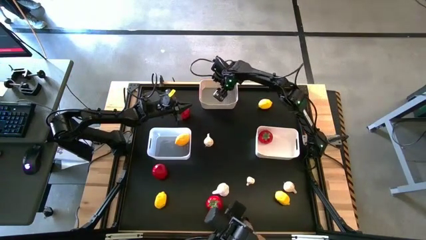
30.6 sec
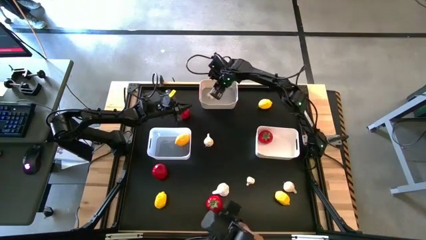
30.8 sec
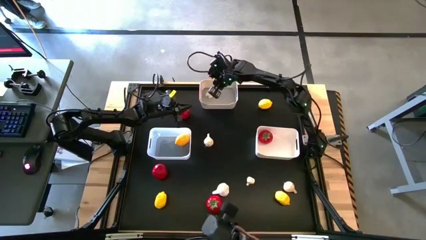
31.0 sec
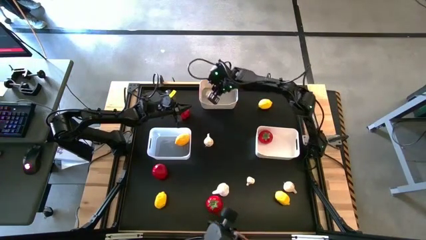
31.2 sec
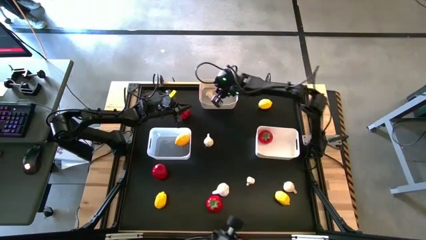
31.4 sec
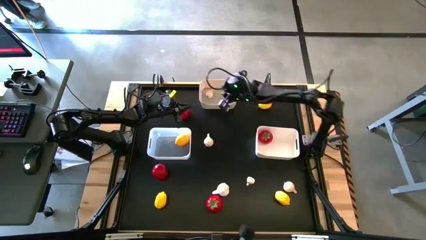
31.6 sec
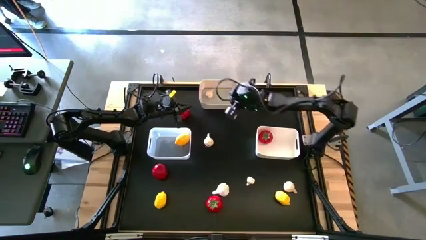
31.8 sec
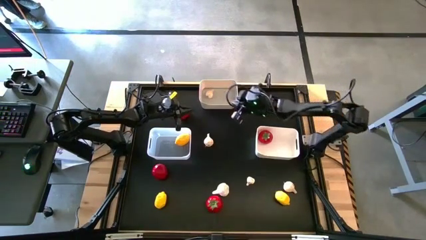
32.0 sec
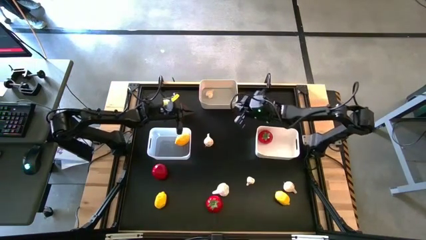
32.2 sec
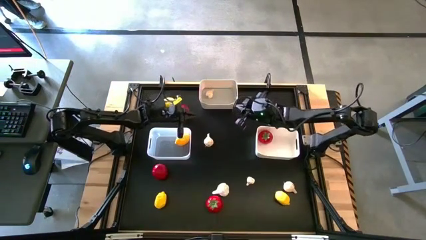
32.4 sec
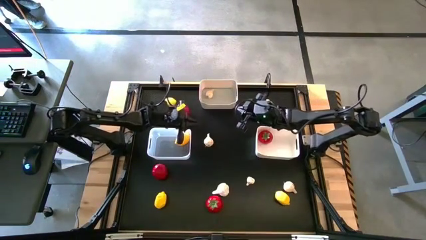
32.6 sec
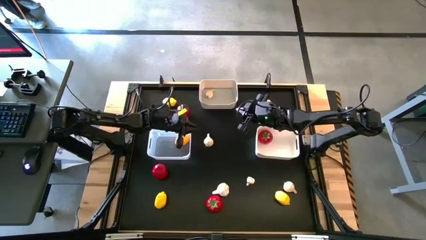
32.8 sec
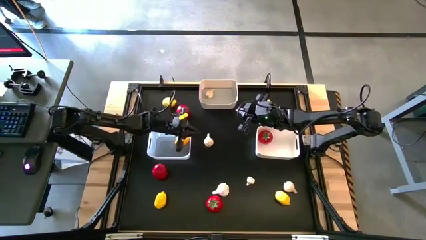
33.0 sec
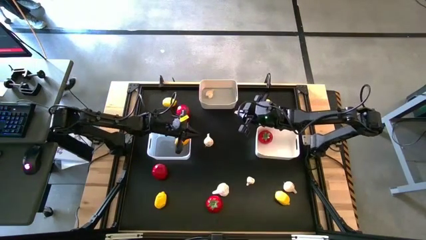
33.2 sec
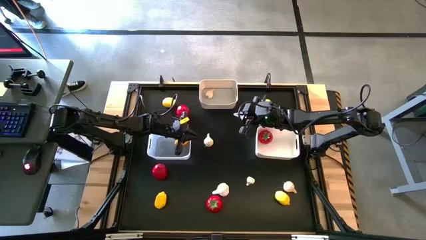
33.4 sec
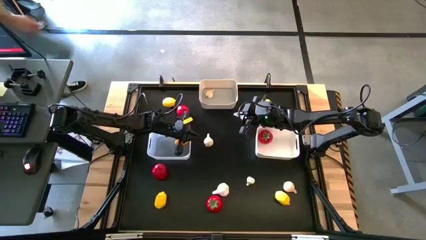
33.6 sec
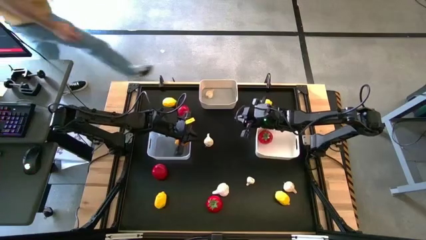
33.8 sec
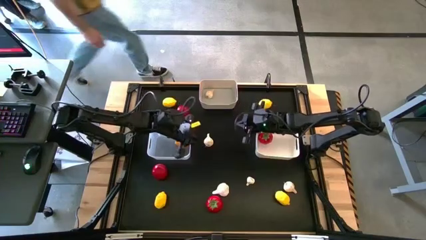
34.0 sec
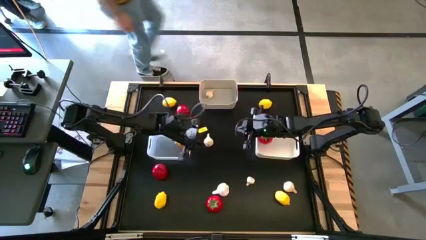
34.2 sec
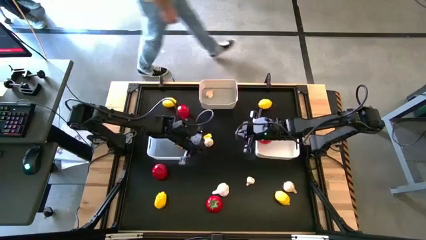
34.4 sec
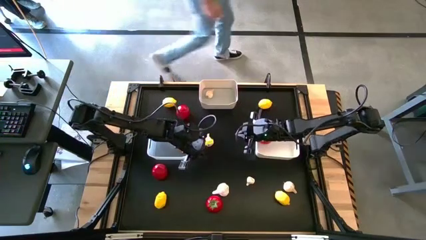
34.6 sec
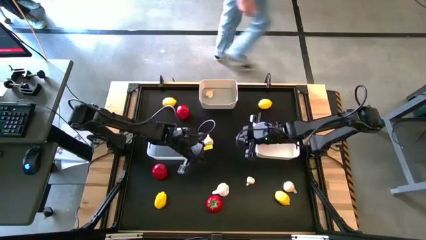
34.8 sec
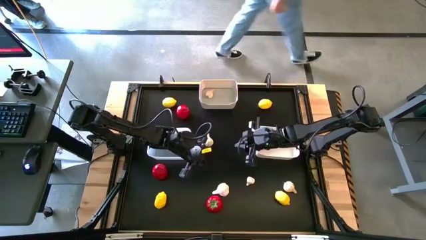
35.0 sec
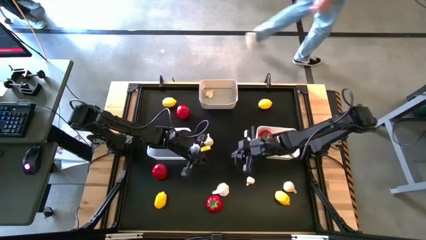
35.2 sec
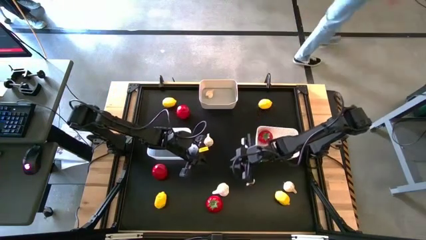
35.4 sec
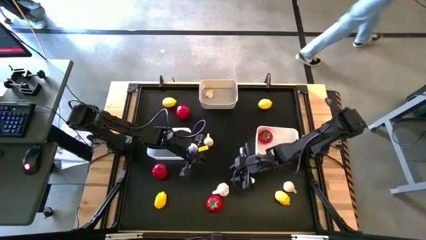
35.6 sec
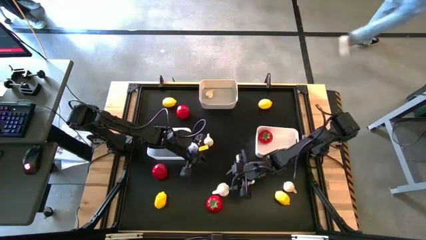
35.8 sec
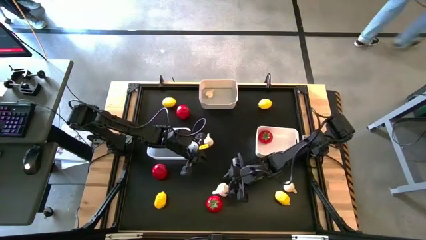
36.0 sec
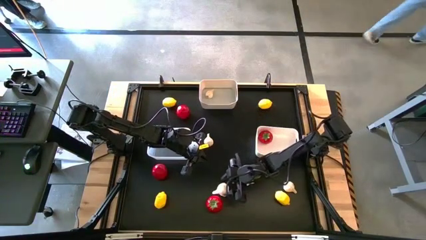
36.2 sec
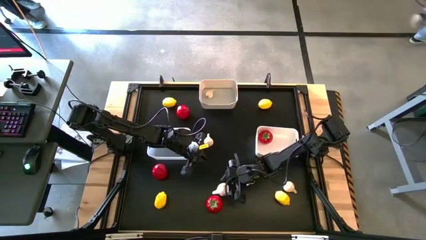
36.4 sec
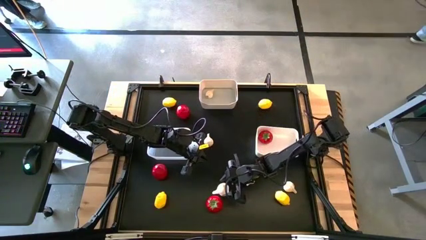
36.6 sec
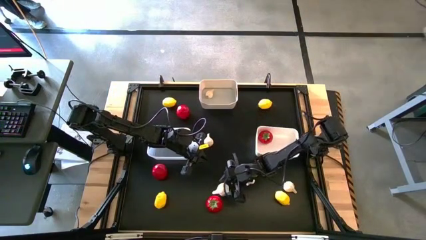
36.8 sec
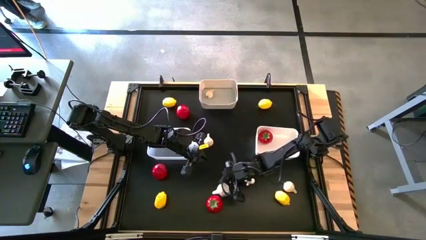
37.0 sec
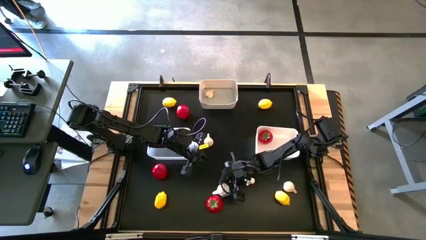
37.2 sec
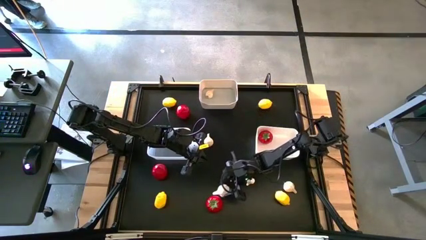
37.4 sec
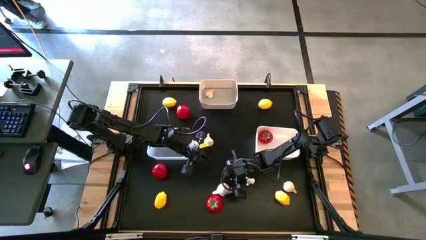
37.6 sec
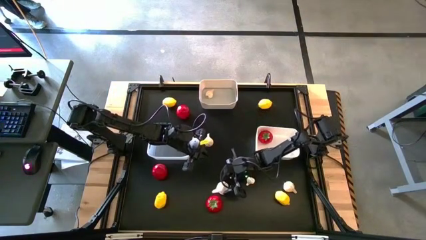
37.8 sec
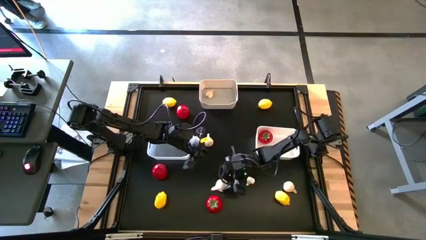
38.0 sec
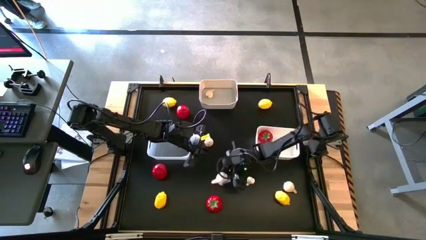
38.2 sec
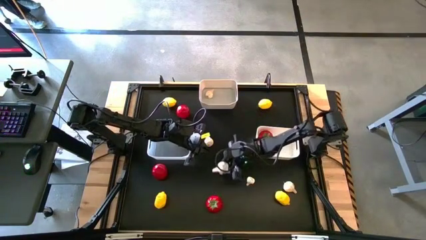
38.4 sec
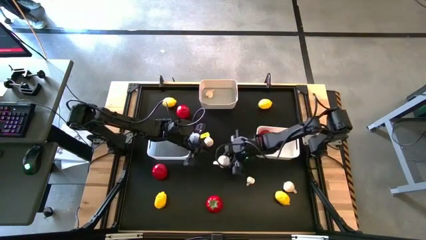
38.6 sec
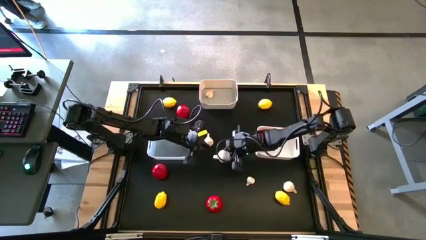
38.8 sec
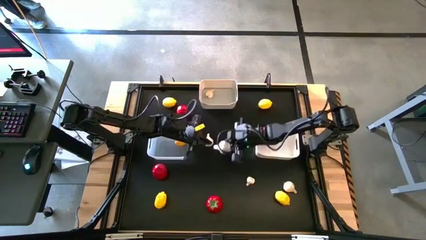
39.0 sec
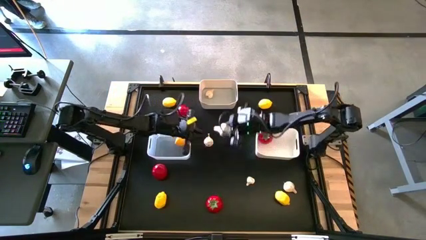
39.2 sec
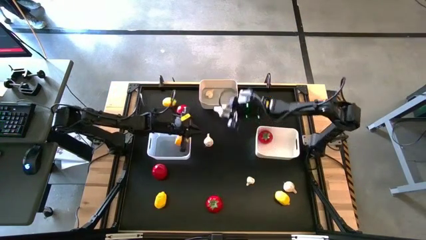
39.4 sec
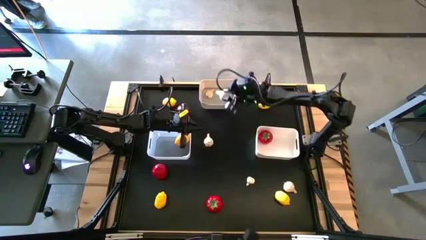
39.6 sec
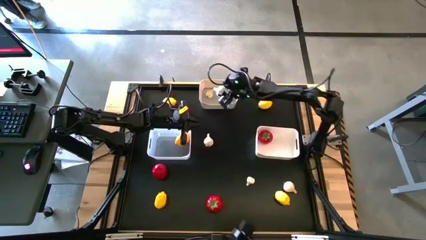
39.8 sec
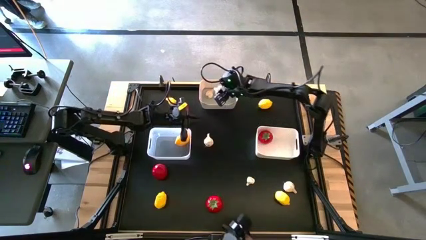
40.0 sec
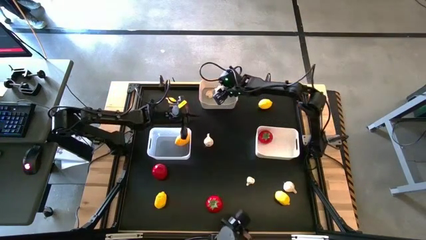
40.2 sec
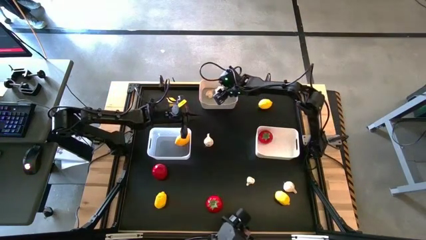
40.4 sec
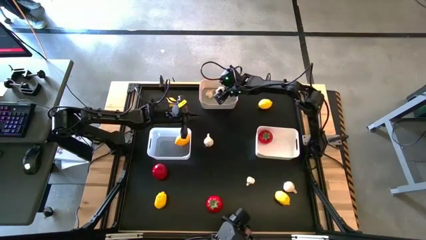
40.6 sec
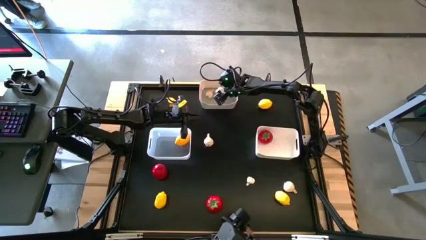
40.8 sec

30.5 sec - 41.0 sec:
Task: Sort produce into baskets
Put the white garlic into the top left white bin
